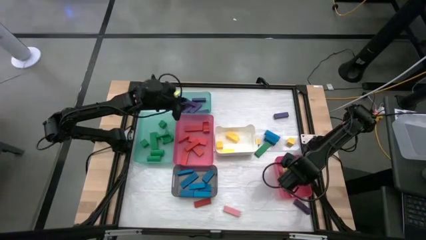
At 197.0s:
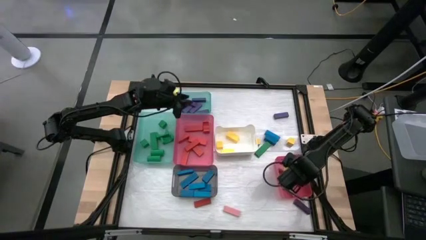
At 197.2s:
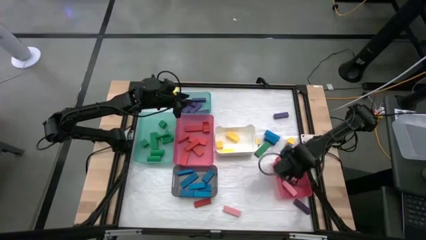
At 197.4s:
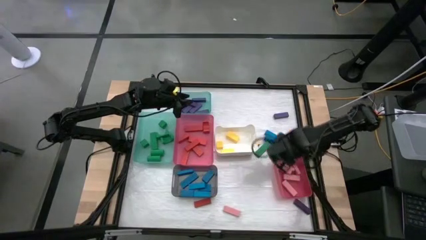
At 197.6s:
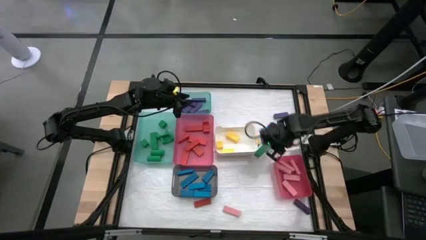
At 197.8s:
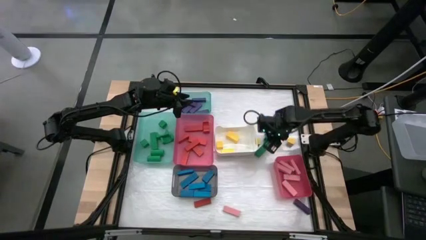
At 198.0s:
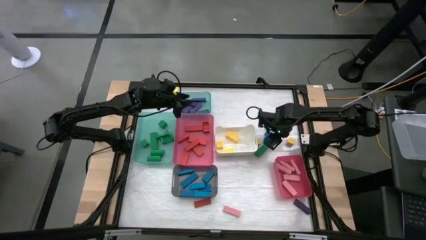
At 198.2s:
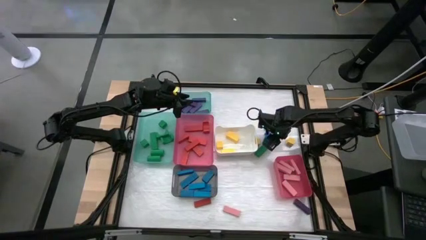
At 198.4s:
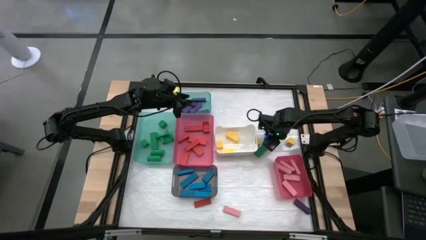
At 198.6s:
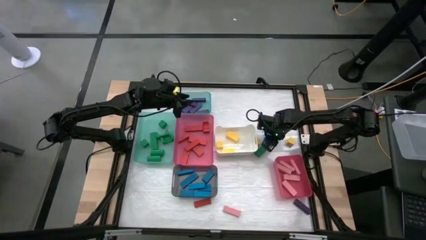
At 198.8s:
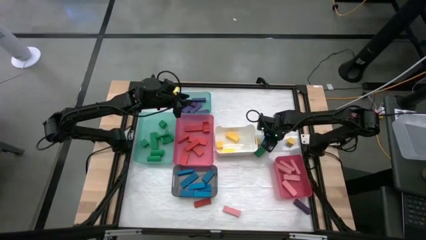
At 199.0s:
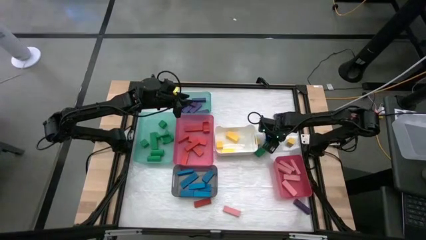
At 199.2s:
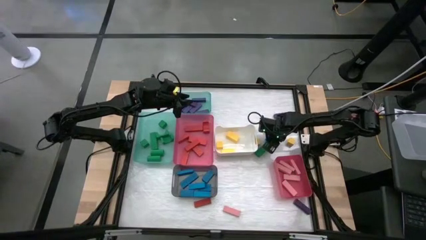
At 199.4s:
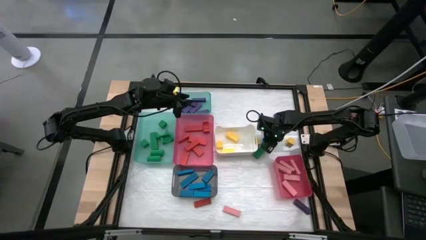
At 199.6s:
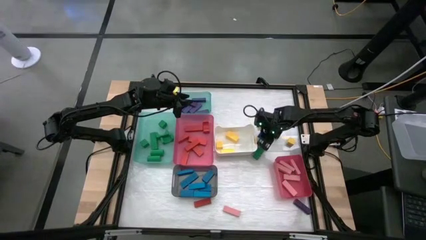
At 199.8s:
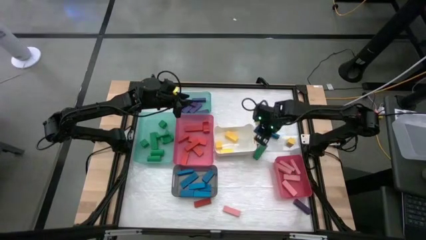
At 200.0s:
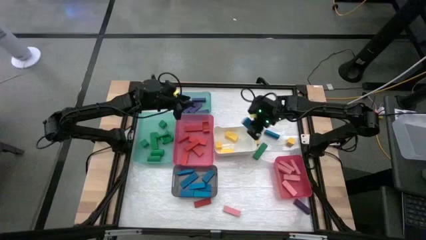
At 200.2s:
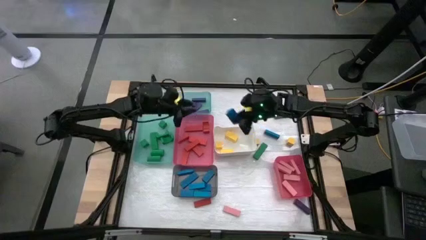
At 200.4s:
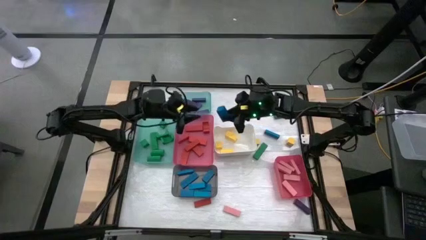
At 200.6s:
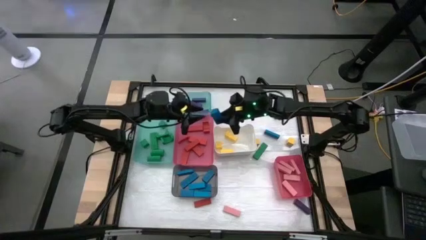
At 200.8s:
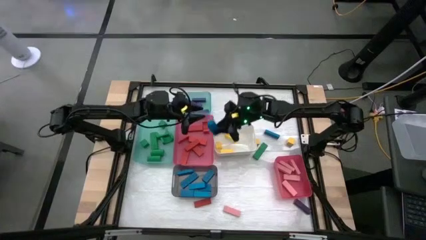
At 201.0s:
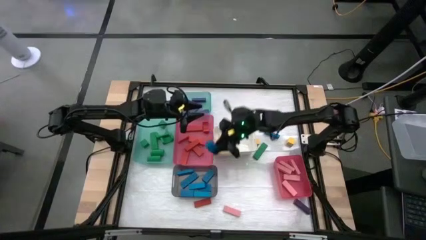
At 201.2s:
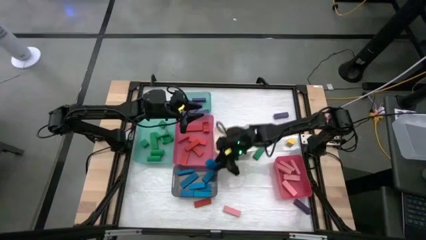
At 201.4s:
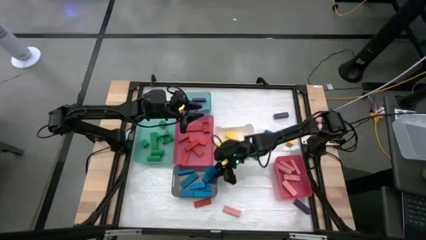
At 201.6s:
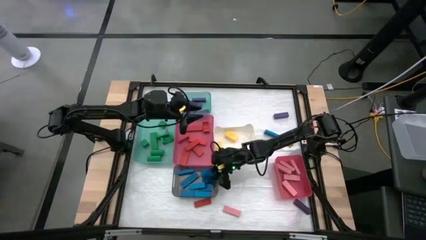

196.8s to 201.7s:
Task: Sort blocks
Put the blue block into the black bin

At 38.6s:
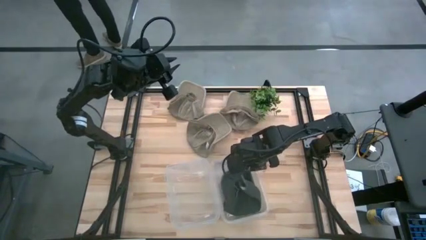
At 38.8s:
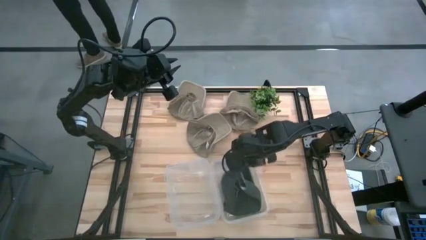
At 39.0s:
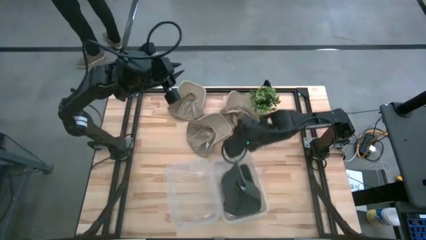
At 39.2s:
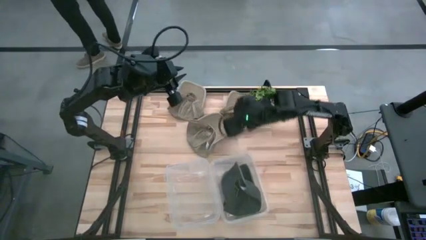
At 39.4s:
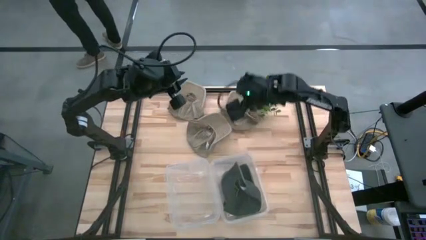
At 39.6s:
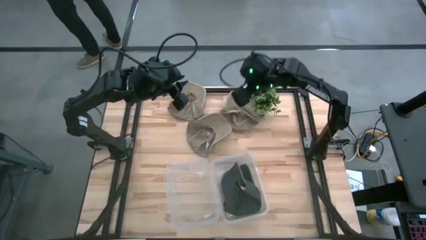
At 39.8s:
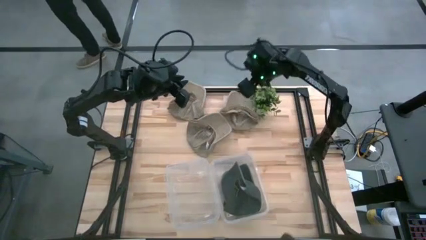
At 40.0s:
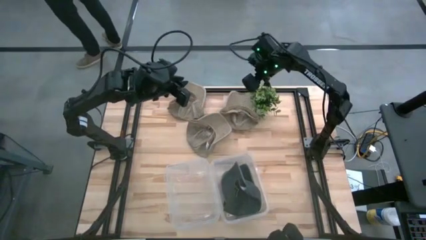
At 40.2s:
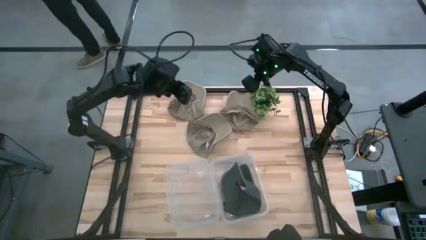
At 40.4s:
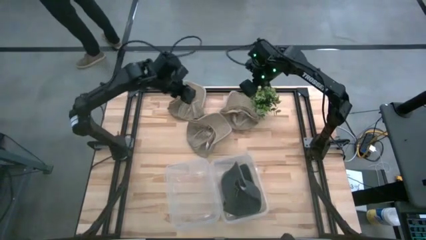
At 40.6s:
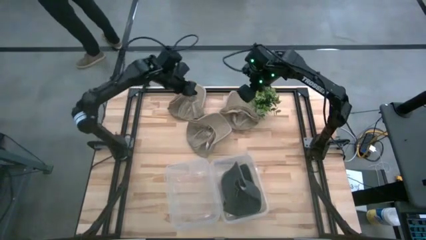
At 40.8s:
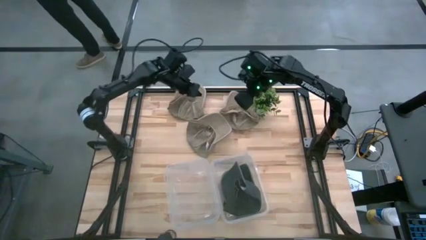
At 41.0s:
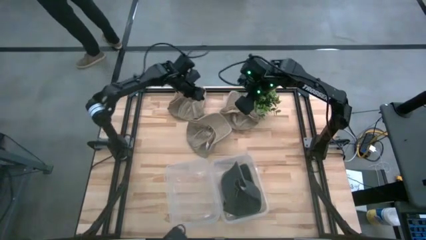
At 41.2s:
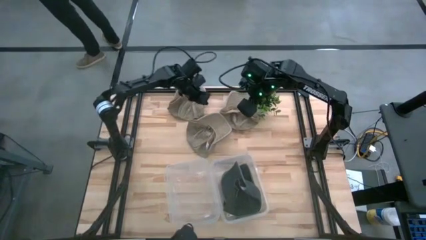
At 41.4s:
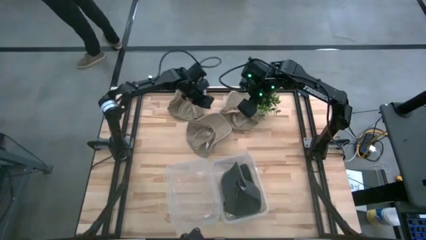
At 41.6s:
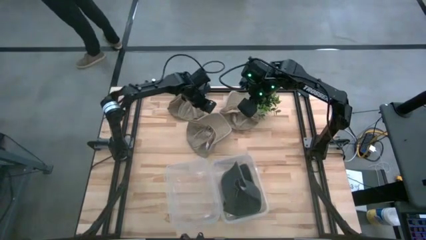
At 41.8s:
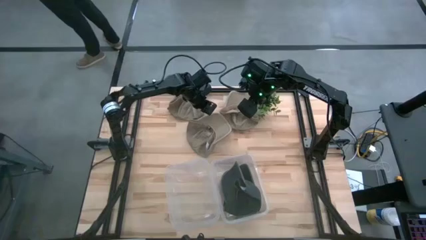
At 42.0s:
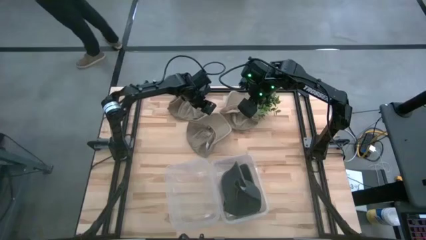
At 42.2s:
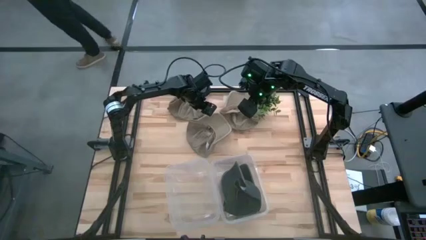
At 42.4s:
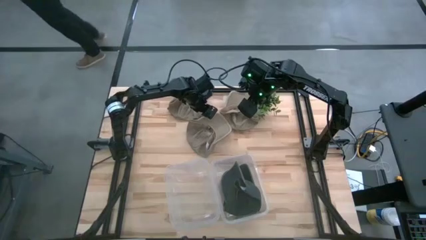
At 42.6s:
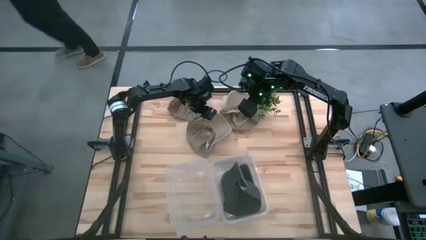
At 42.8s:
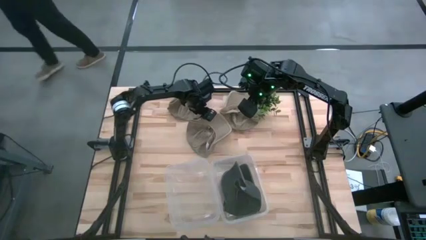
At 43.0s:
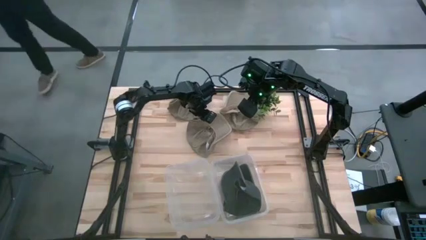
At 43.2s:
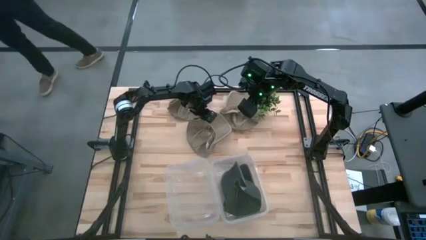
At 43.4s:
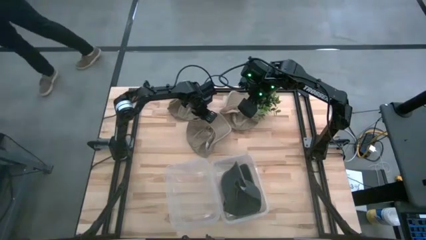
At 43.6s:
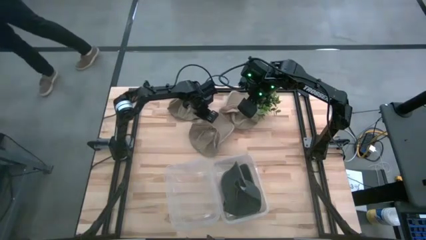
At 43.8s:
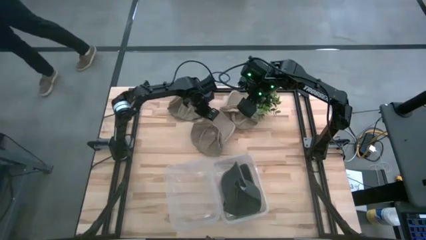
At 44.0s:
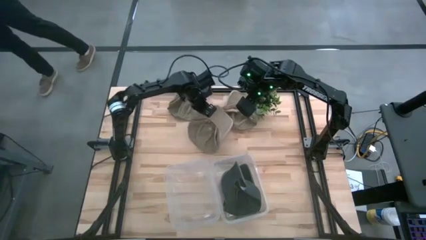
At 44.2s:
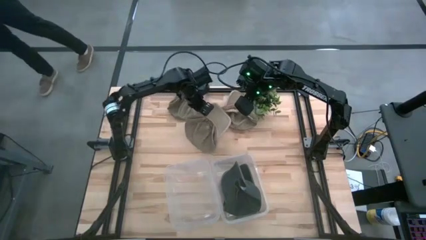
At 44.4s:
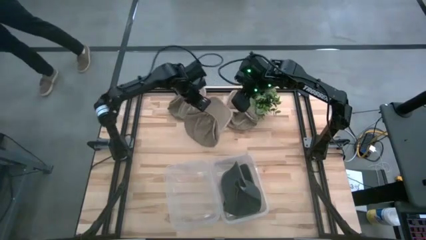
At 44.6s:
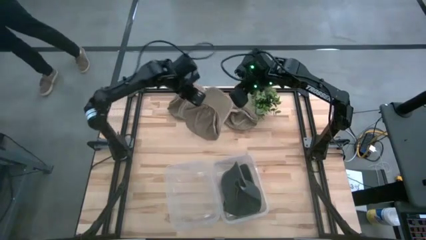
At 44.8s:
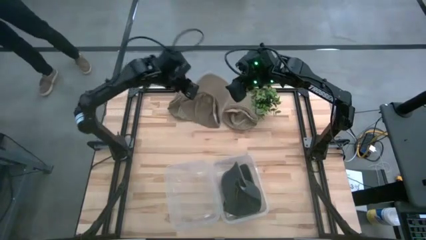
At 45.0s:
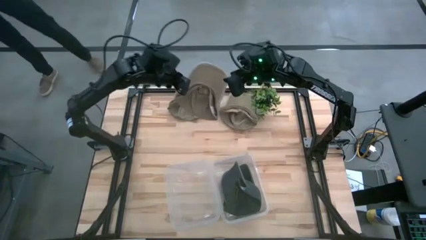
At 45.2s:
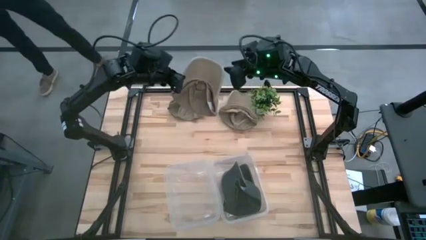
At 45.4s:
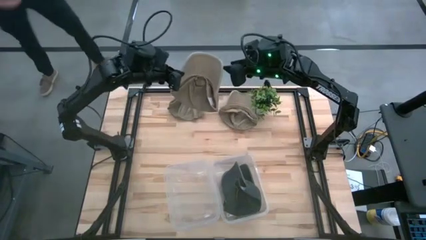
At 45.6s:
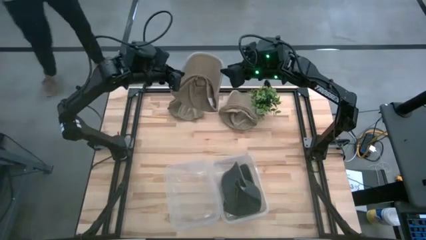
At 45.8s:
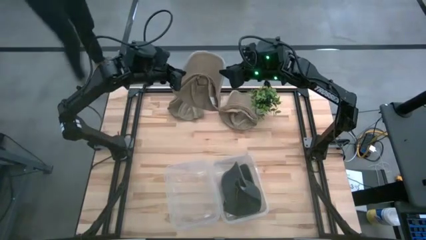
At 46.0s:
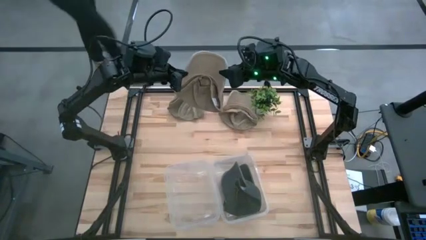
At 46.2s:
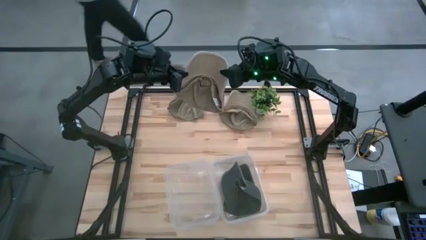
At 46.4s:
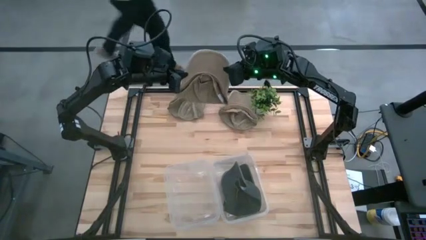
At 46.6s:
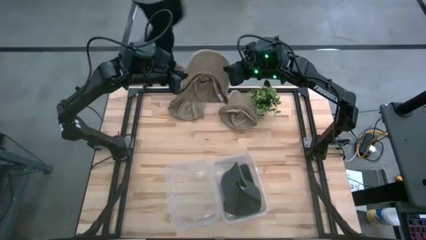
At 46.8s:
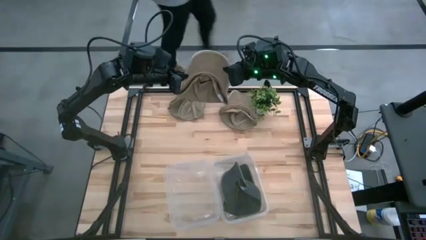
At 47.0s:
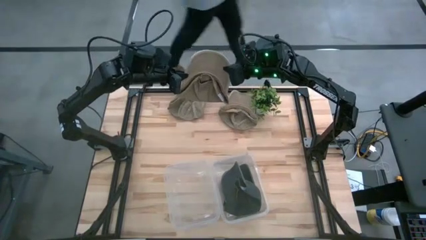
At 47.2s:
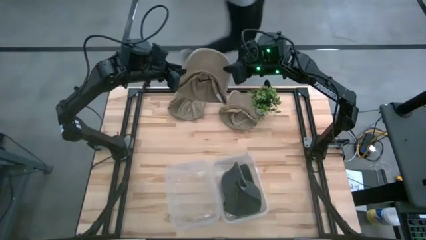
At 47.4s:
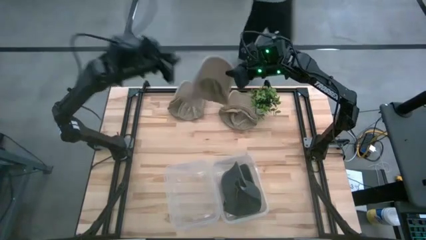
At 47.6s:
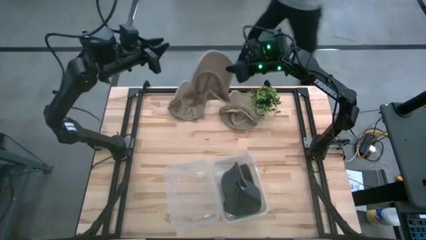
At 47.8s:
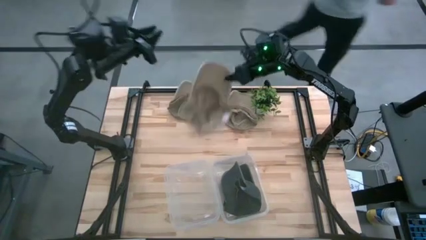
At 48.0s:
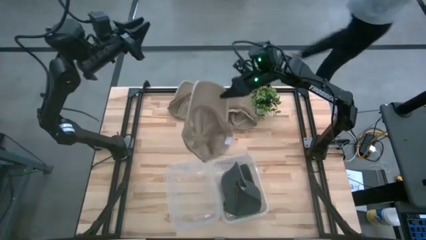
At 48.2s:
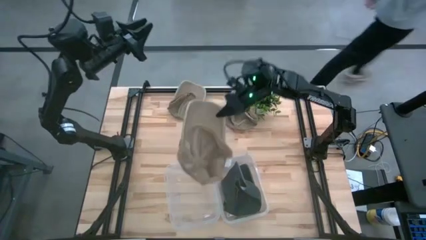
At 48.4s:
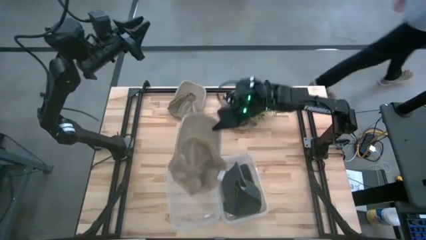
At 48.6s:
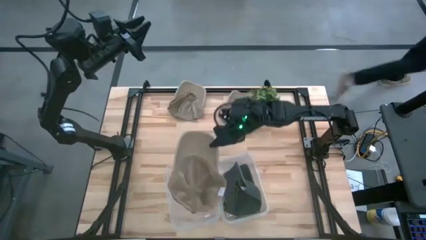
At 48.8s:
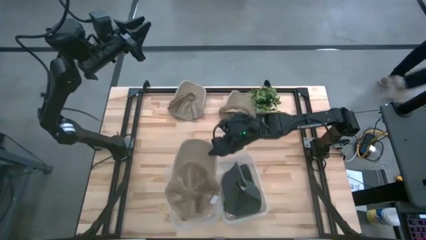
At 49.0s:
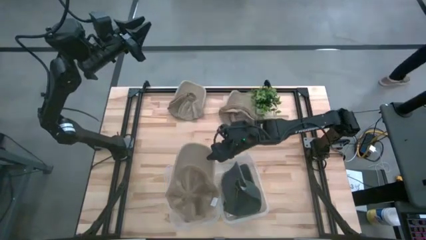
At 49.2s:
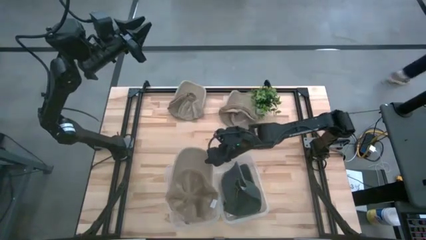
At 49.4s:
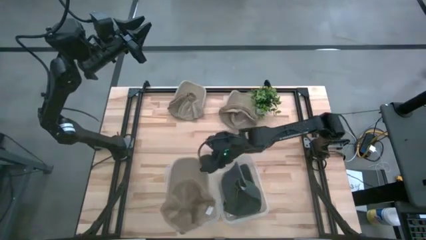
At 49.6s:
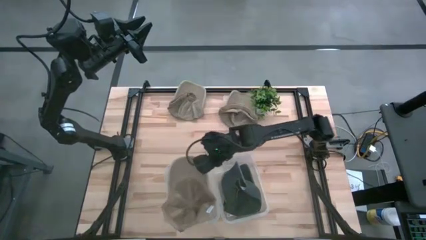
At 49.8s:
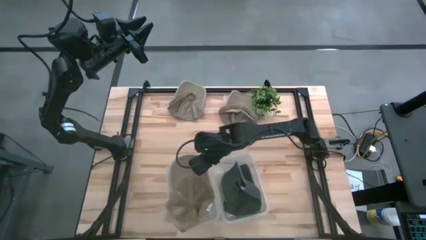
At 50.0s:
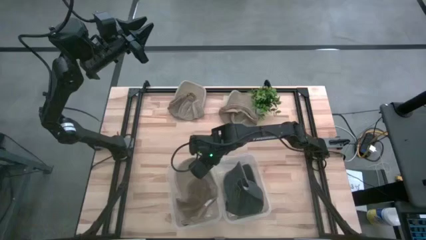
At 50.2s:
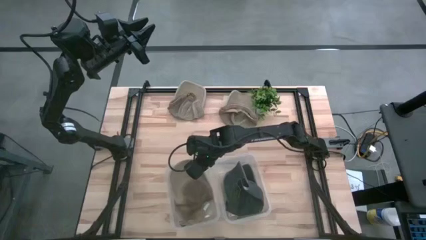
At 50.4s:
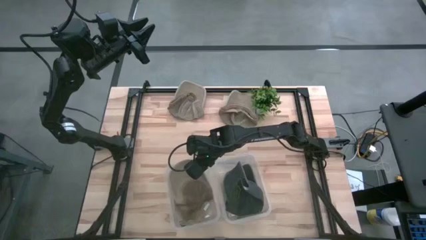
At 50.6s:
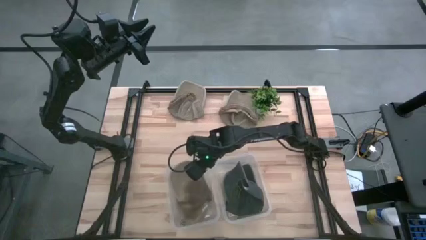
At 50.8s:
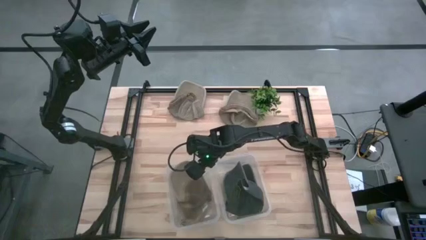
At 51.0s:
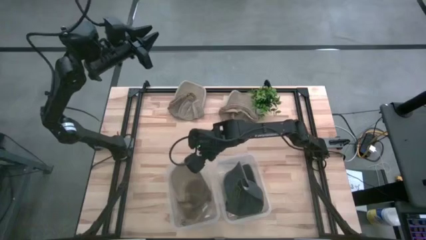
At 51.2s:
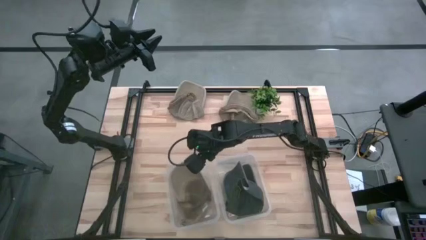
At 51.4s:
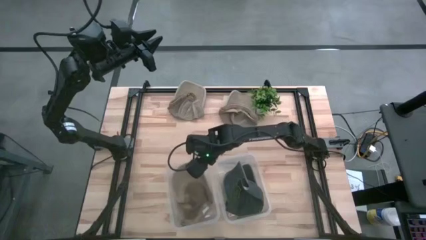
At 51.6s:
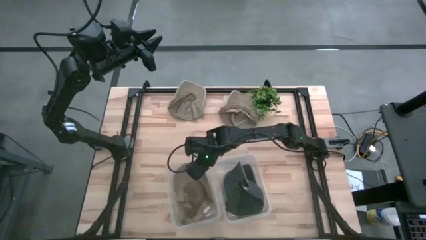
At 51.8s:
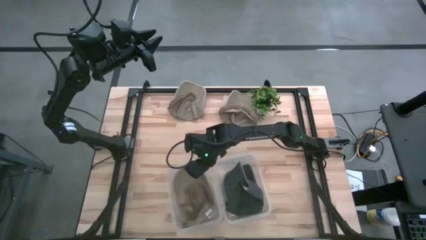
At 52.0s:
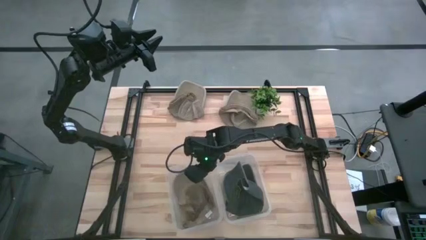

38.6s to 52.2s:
Task: Pick & Place hat
Put the bottom brown cap into the left transparent bin
